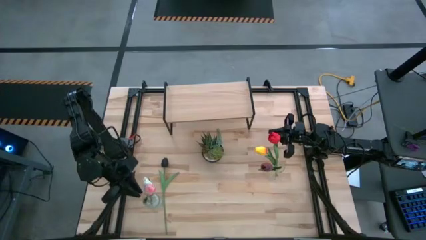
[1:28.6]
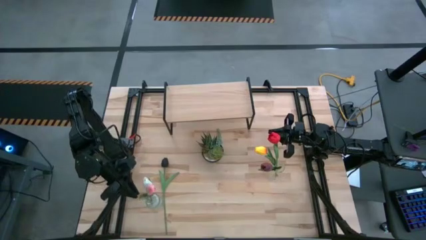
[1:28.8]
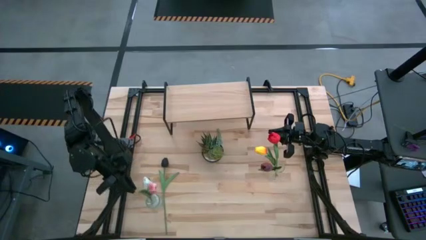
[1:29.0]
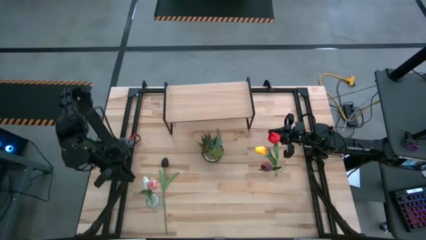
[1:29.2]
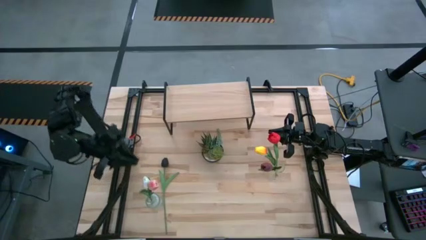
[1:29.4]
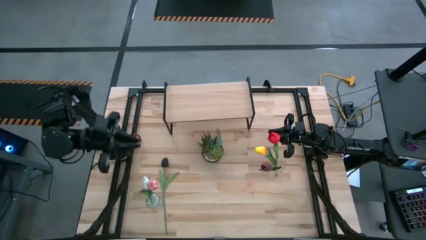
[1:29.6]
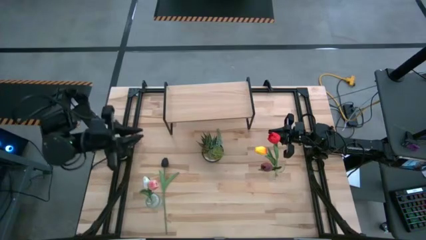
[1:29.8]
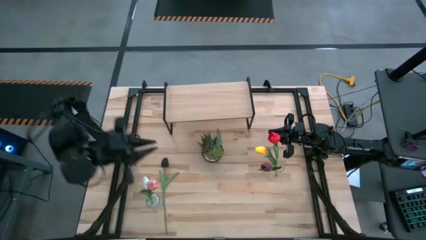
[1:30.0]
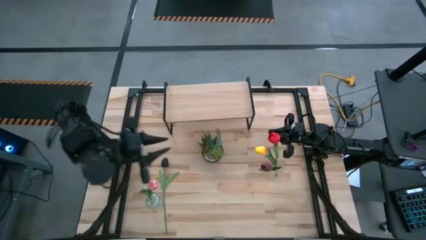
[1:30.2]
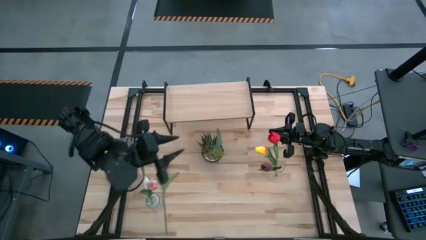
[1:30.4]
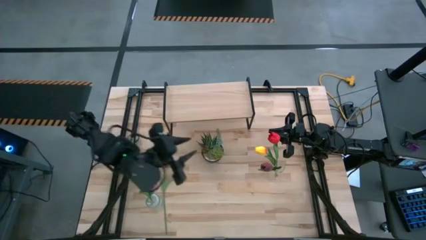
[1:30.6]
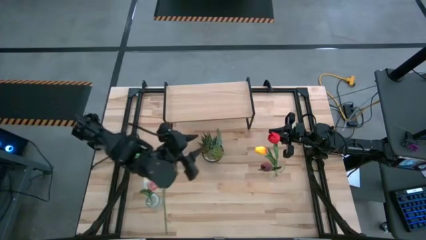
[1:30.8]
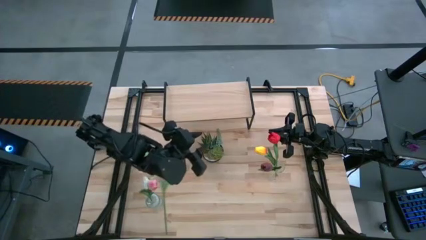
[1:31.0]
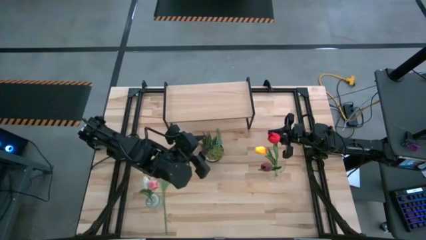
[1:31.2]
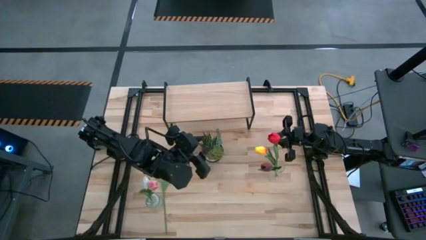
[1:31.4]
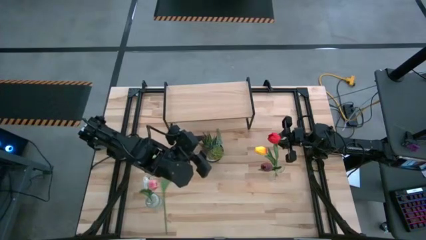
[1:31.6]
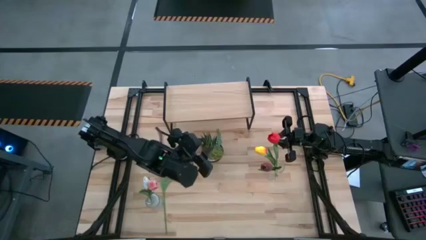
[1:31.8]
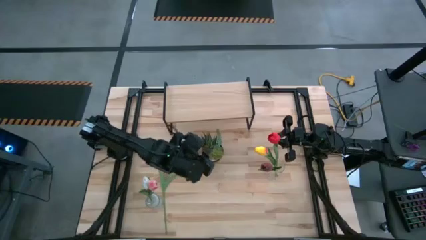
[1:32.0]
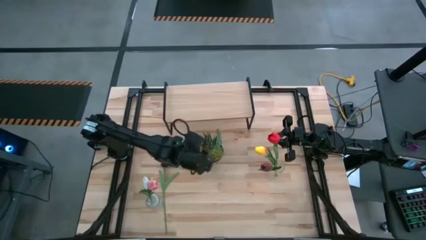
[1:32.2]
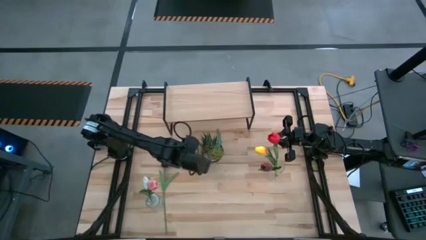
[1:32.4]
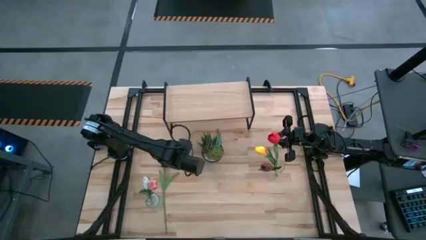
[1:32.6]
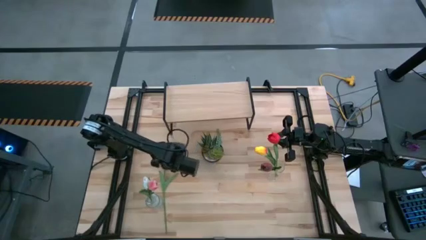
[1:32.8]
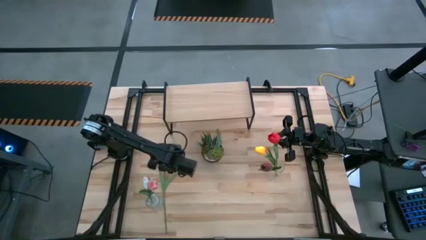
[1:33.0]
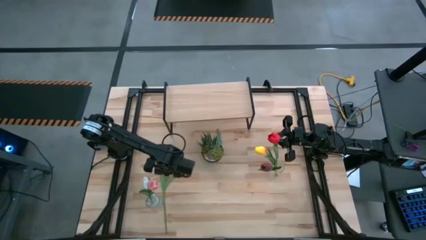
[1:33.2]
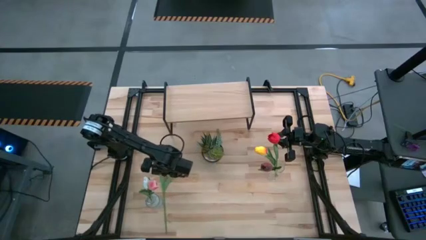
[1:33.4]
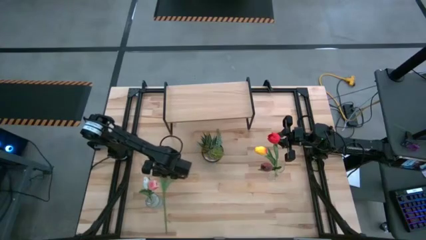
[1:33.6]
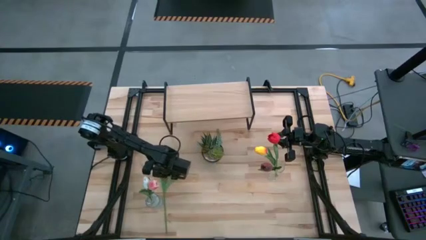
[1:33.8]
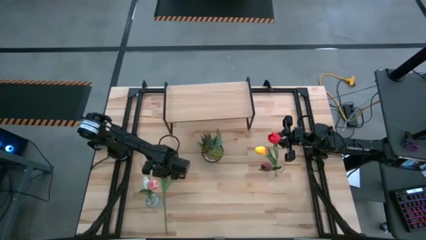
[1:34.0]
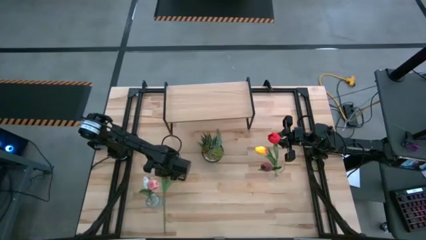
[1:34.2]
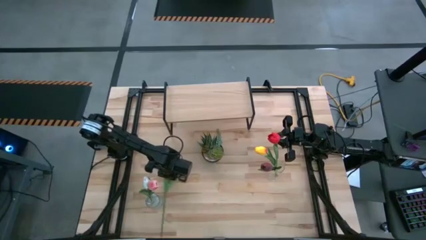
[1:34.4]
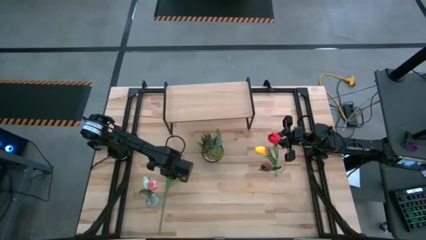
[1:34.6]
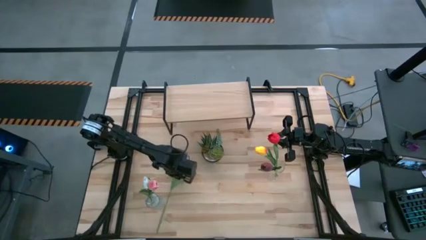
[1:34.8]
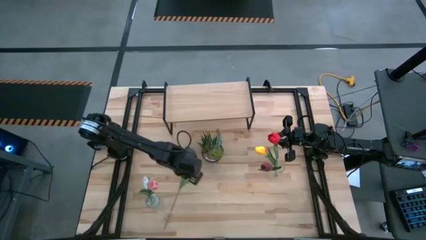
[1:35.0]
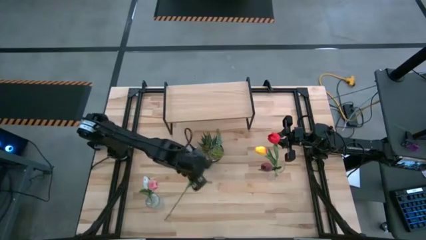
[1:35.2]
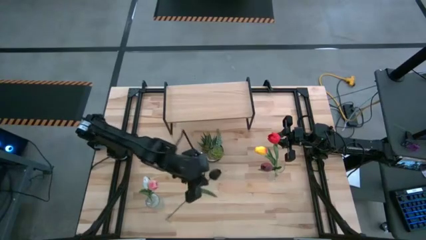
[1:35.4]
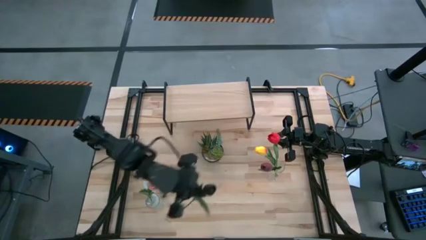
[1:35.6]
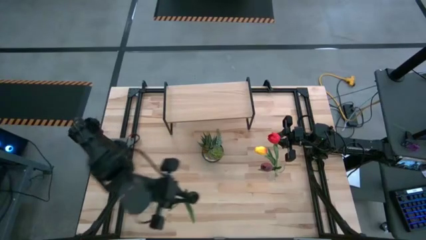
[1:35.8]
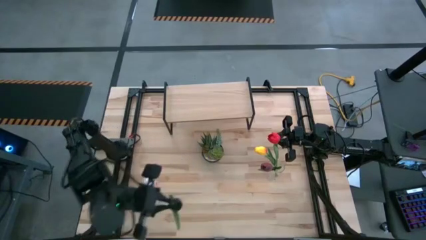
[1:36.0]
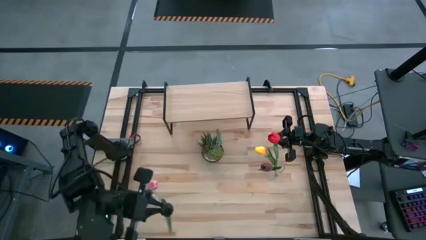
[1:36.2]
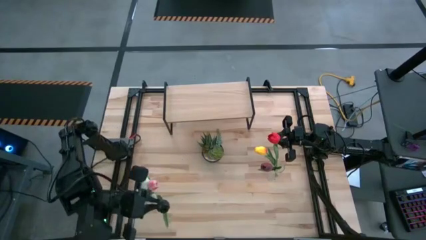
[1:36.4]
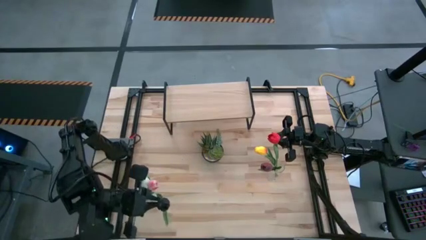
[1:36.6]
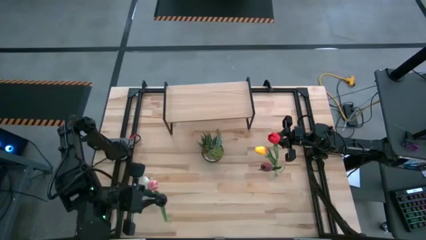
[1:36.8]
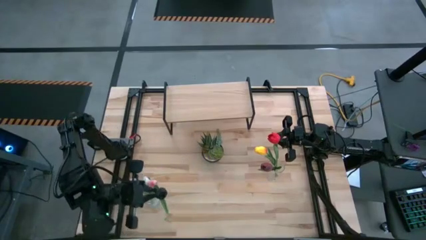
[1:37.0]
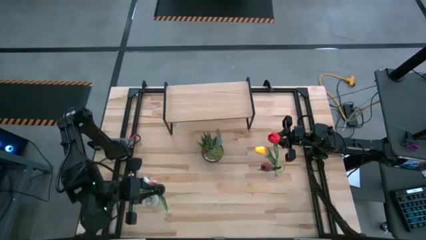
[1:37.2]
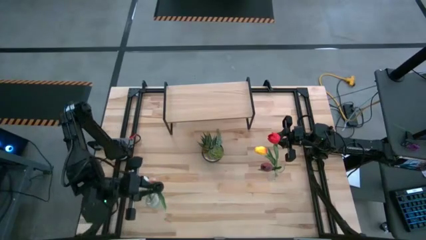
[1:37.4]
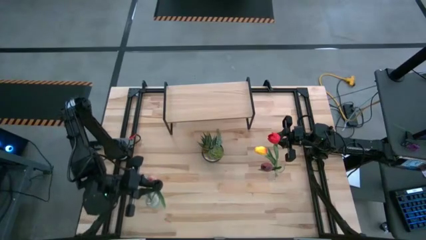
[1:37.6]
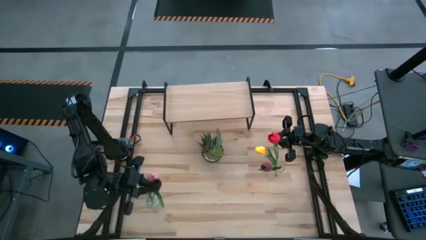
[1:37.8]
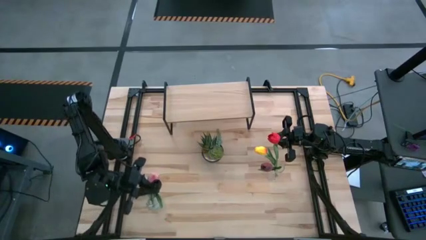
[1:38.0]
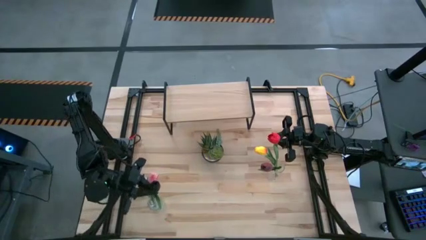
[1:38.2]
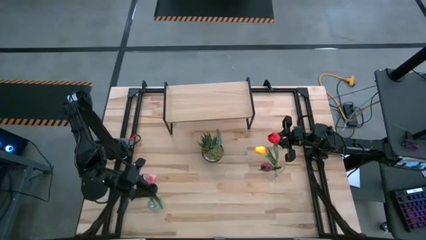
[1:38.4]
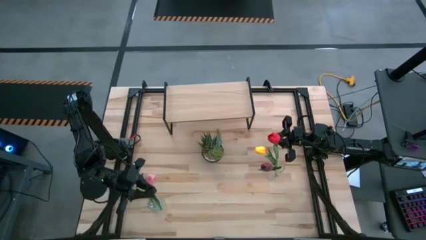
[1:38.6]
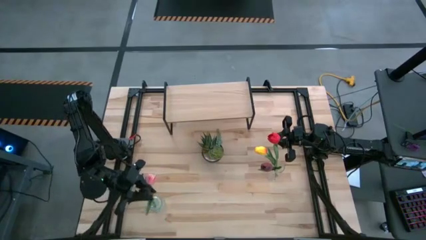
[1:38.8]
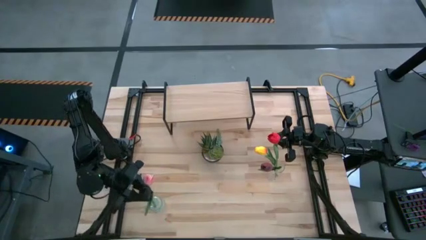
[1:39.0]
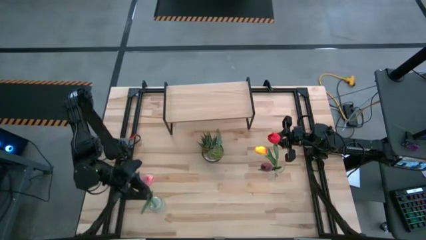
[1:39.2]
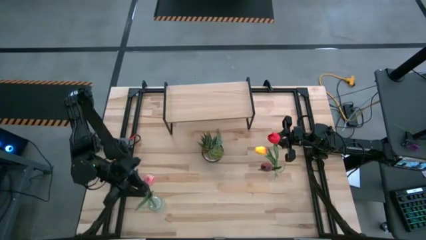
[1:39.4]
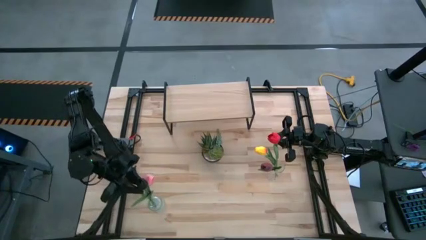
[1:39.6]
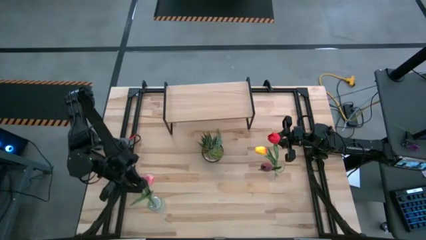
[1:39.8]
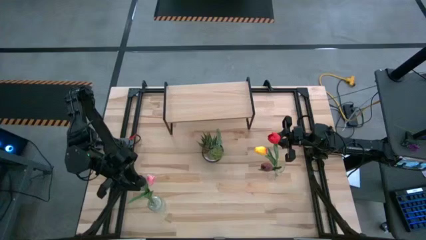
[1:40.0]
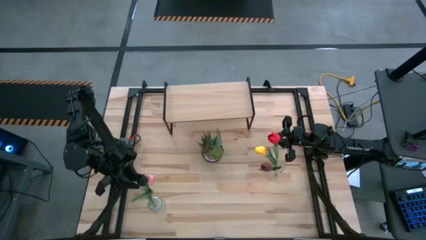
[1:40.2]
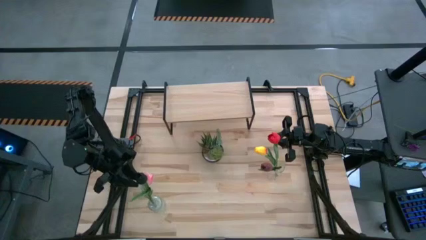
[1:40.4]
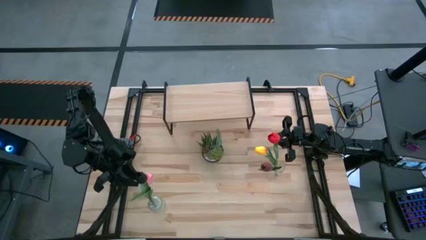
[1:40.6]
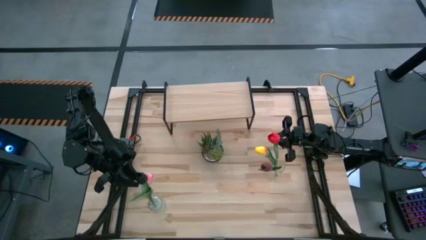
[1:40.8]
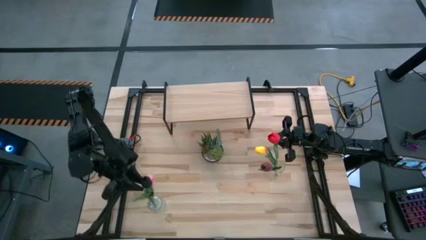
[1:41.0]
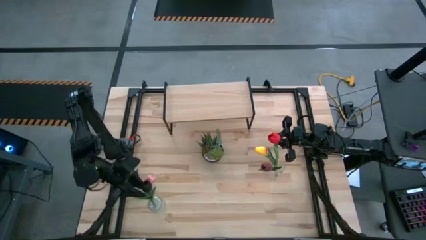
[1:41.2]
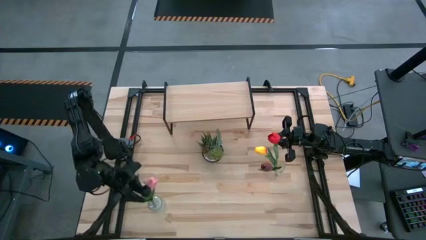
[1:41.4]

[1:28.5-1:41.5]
Task: Pick and place flowers into a vace then onto a shelf
Put the black flower into the left transparent vase
